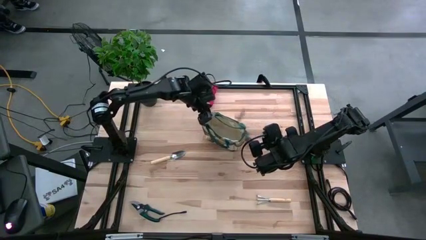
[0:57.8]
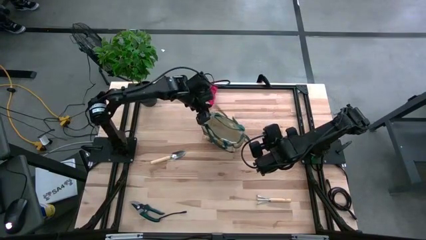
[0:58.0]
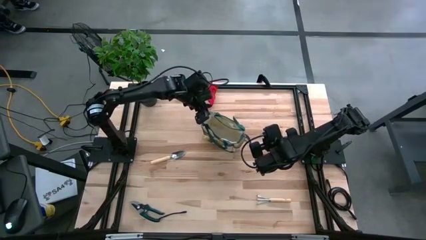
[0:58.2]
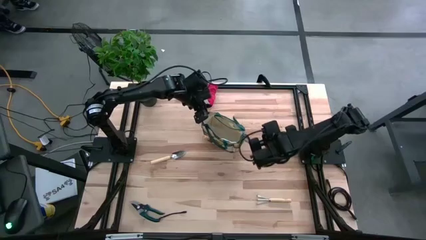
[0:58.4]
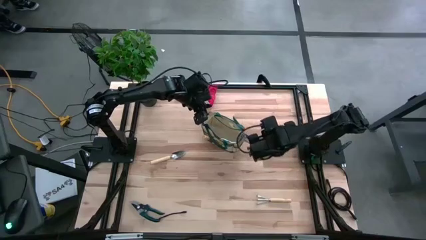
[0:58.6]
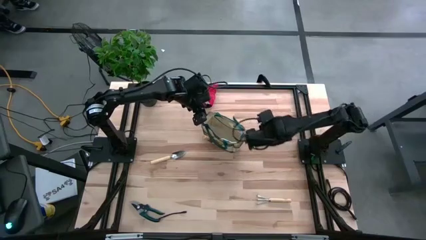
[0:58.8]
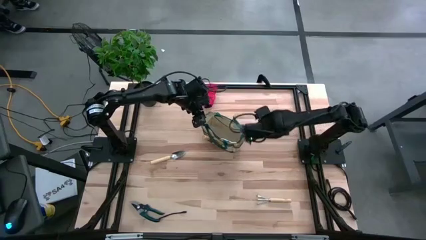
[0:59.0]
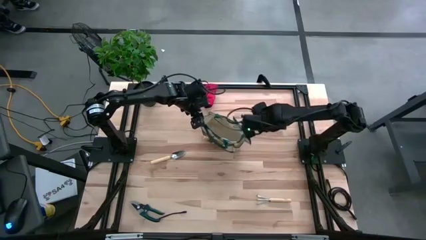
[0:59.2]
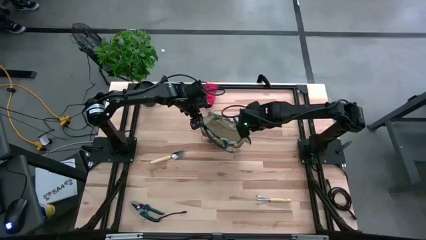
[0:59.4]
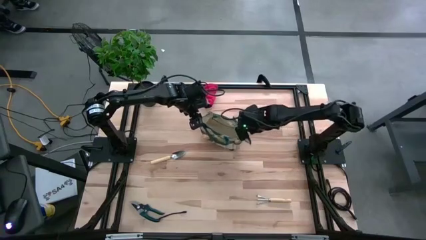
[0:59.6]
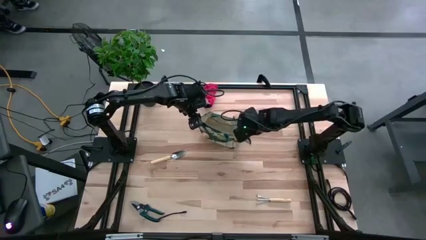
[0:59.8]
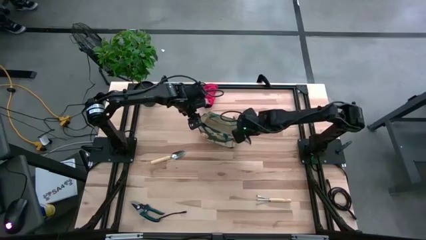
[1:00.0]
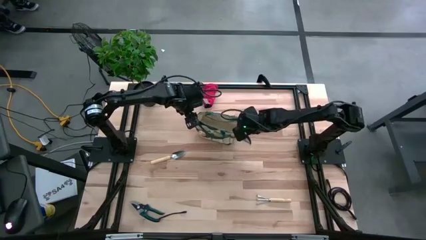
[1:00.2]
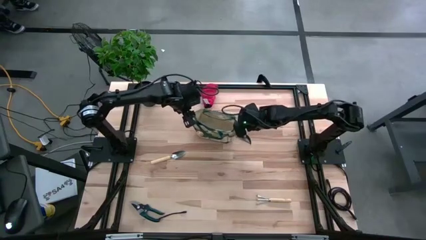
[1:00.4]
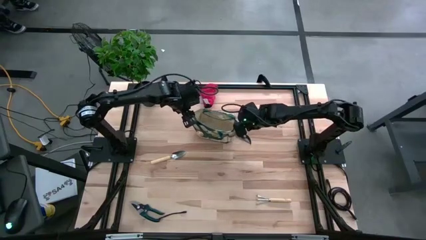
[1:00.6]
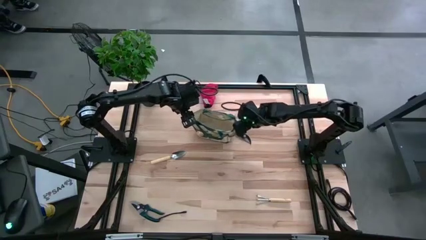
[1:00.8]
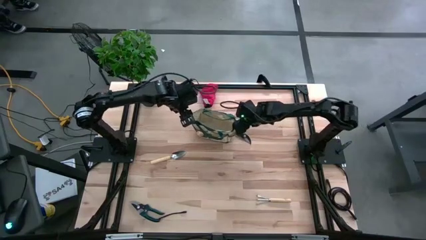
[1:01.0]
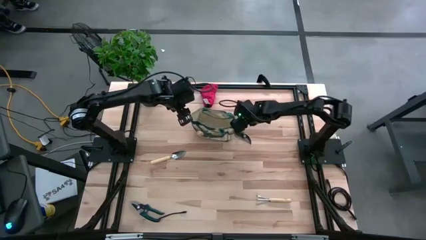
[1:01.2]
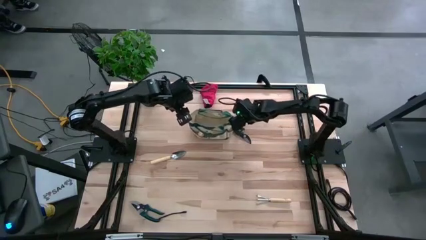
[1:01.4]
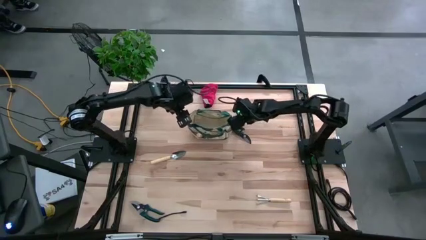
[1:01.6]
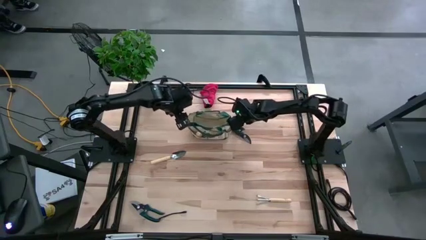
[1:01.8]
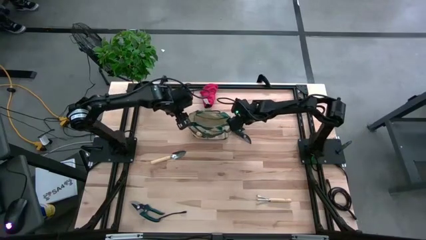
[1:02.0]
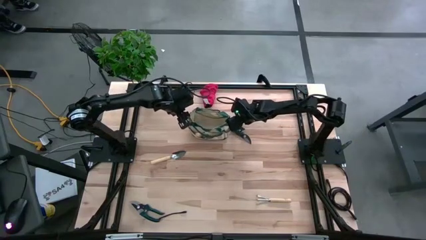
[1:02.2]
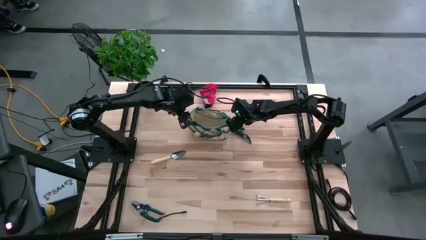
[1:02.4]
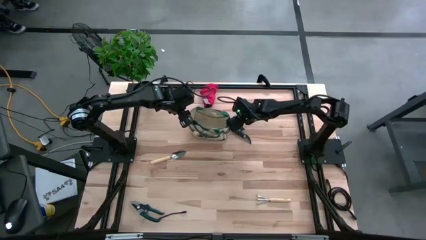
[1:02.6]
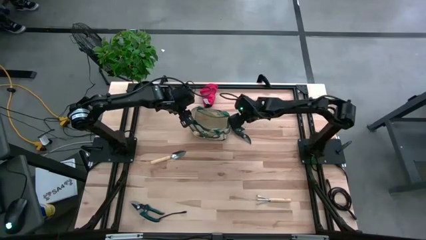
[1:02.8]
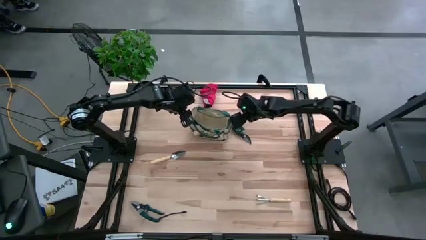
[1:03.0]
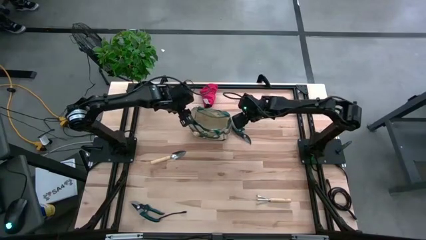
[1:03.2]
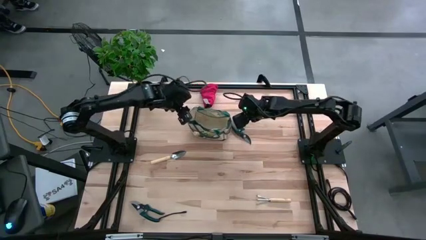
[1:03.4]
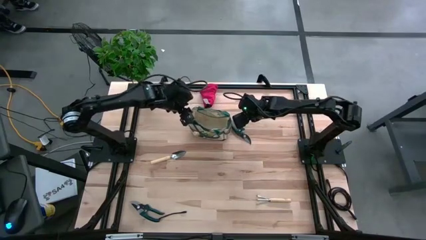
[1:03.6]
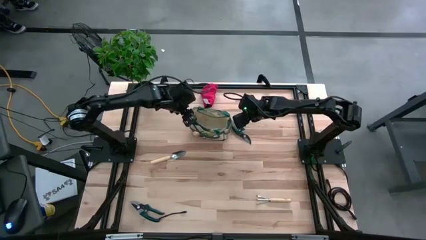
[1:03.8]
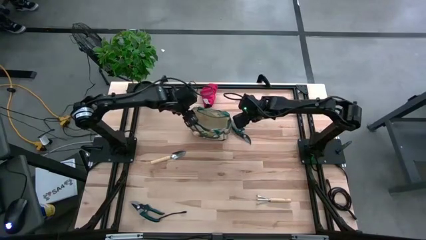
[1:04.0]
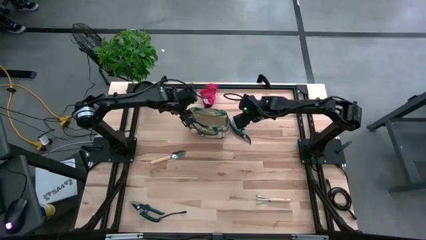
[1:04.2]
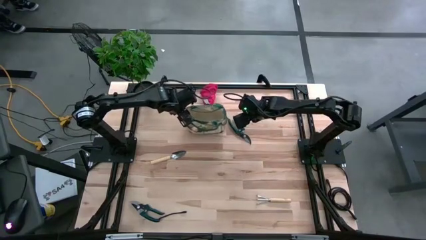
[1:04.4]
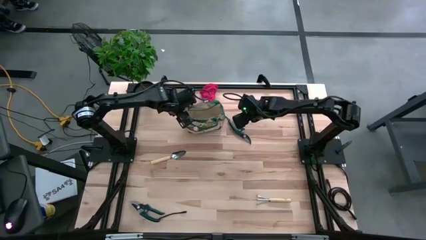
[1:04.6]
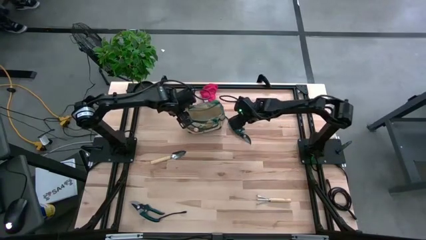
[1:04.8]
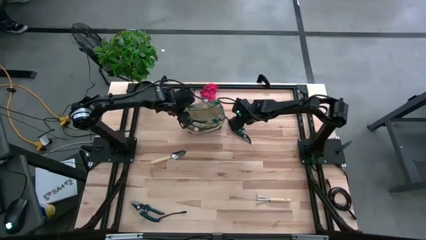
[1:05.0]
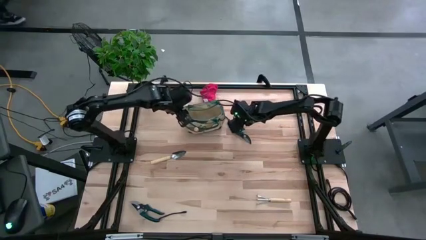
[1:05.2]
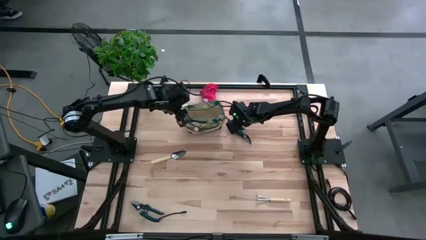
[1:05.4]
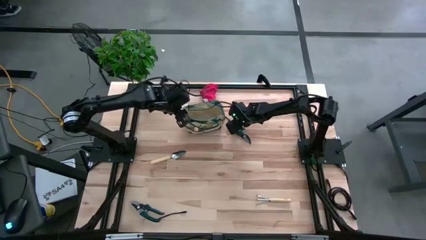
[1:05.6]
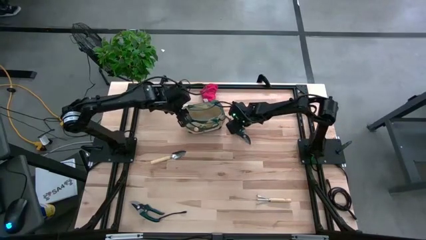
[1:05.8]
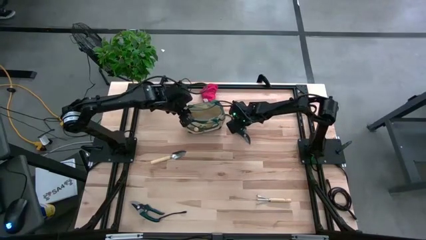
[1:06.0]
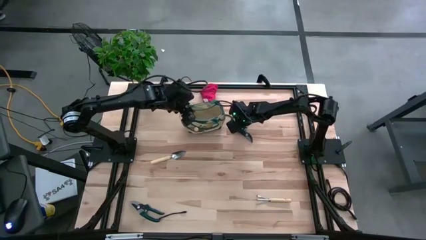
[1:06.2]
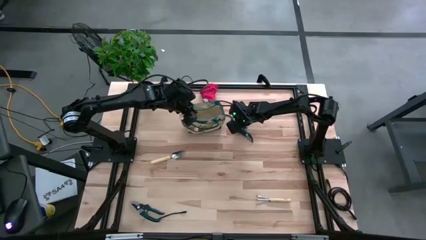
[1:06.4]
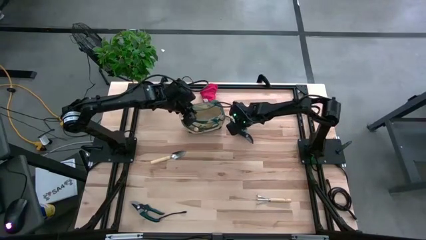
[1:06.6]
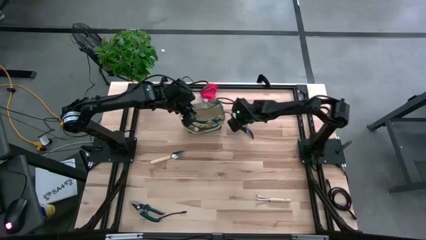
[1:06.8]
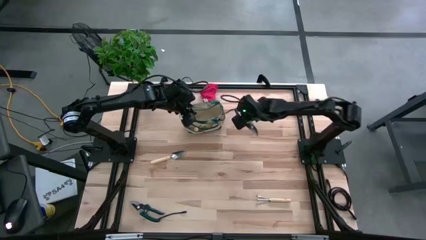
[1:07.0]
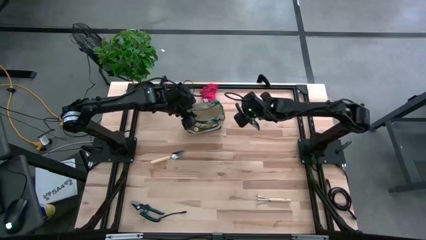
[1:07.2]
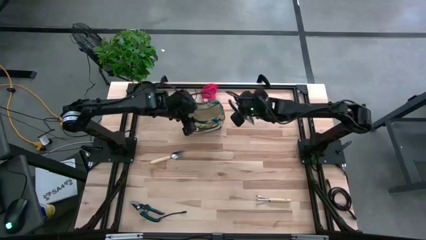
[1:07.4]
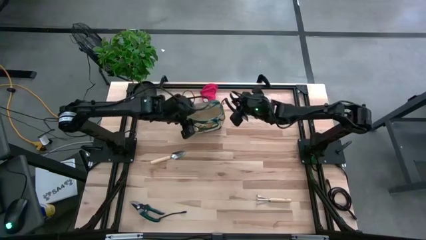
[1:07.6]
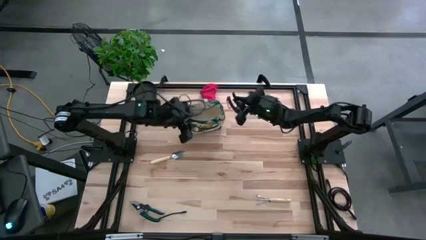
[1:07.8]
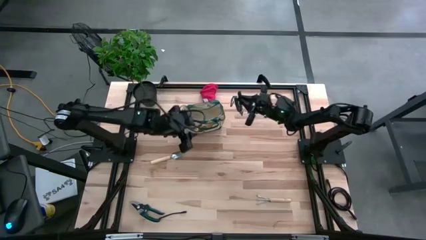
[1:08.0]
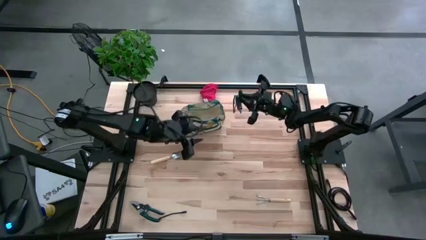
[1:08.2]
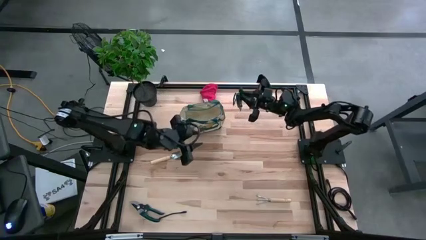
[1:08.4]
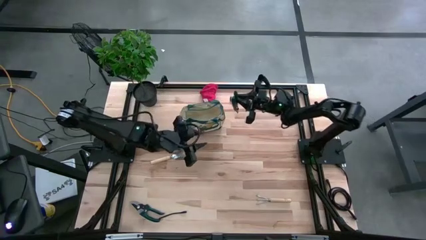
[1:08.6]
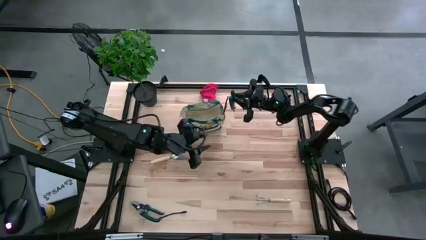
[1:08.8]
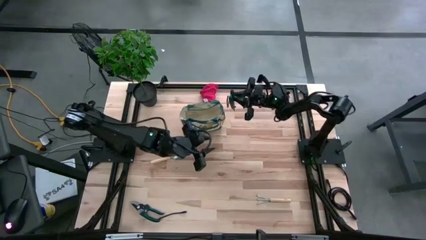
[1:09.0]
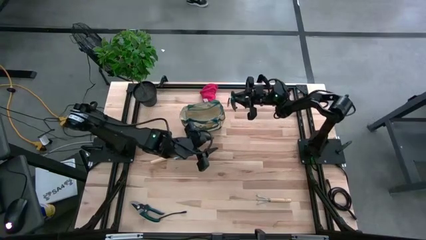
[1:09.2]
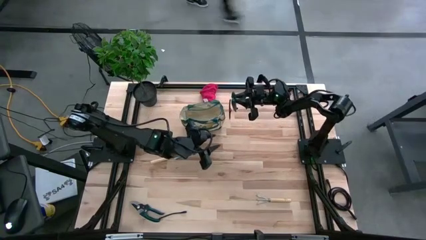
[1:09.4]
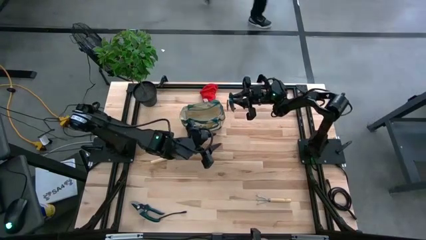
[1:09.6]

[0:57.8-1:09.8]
Task: Pick & Place Garden tools in Gardening bag
Put the top black shear scissor into the gardening bag

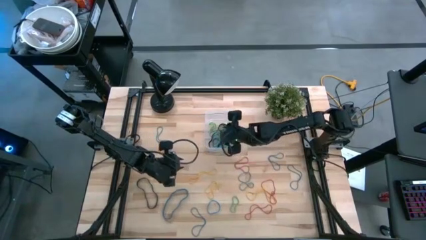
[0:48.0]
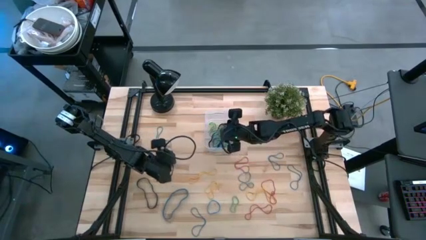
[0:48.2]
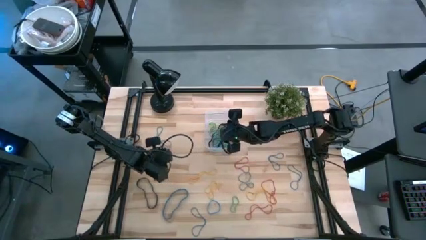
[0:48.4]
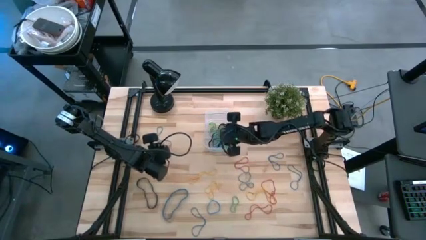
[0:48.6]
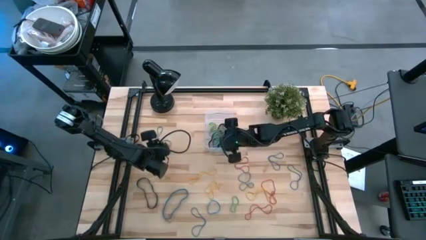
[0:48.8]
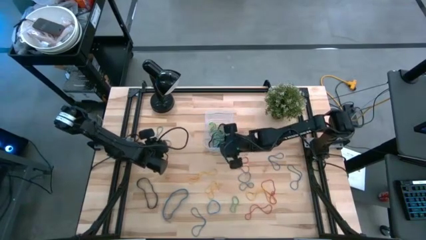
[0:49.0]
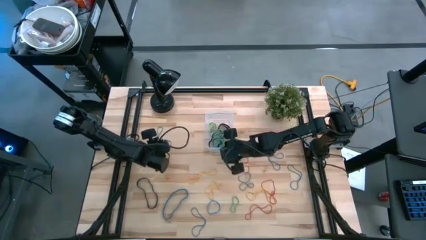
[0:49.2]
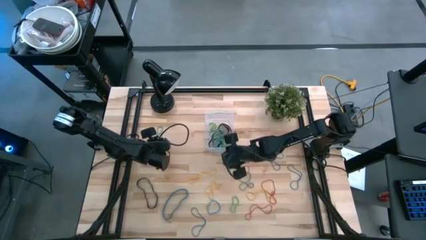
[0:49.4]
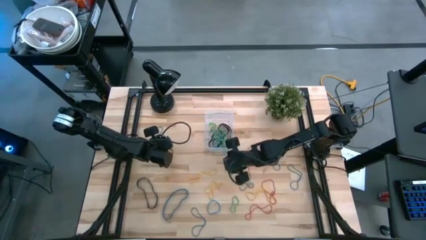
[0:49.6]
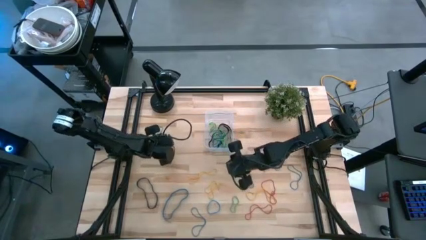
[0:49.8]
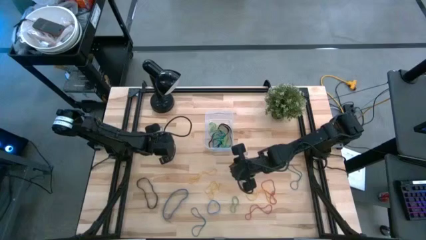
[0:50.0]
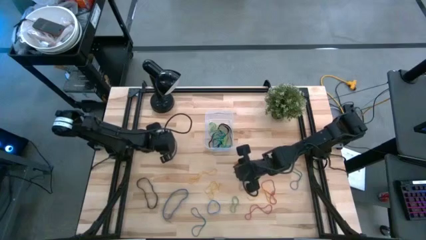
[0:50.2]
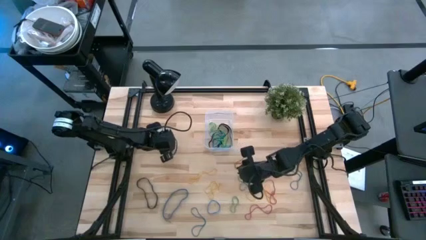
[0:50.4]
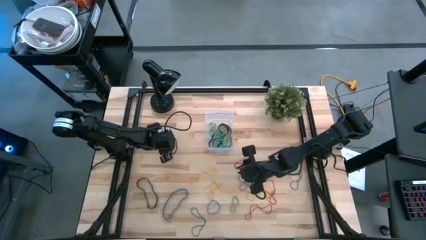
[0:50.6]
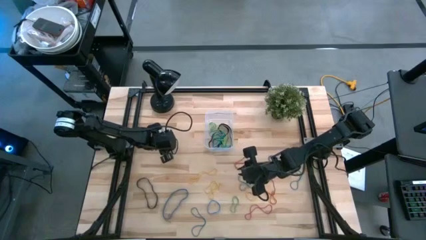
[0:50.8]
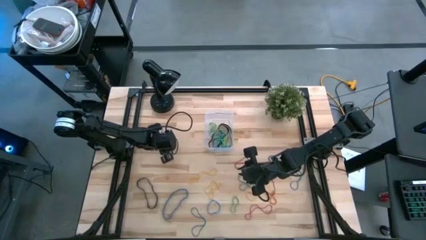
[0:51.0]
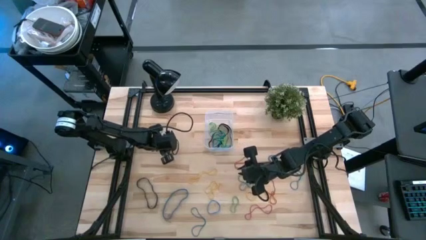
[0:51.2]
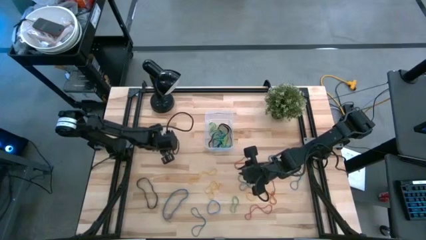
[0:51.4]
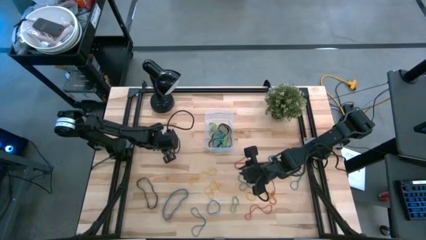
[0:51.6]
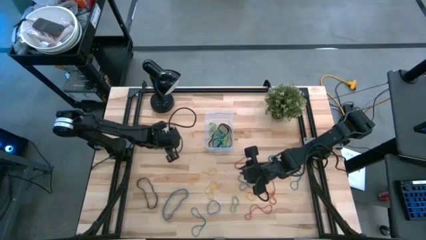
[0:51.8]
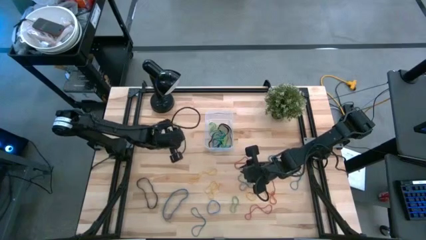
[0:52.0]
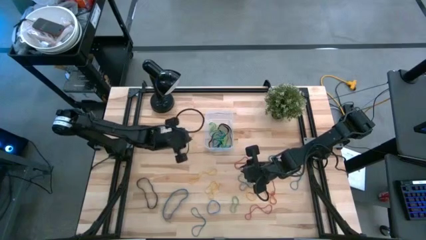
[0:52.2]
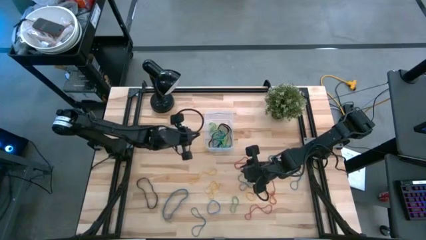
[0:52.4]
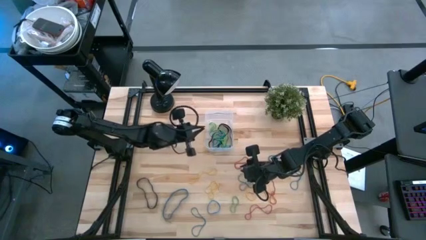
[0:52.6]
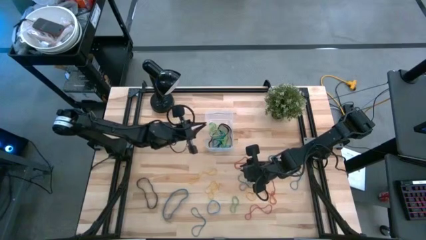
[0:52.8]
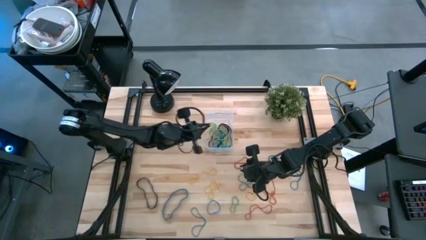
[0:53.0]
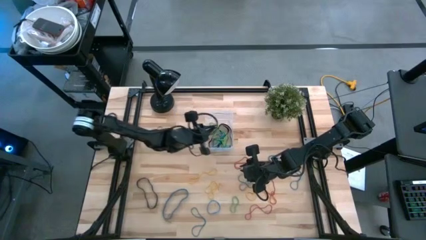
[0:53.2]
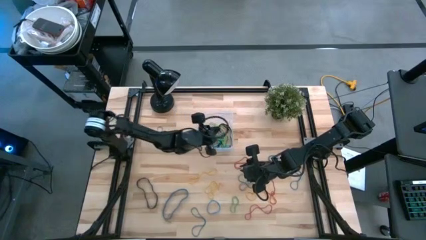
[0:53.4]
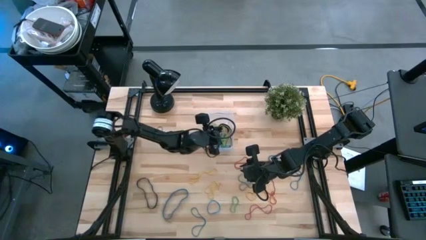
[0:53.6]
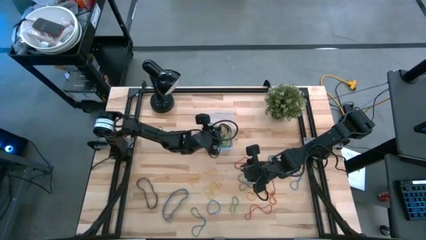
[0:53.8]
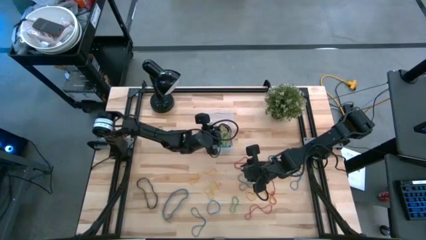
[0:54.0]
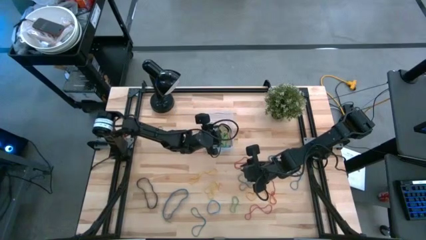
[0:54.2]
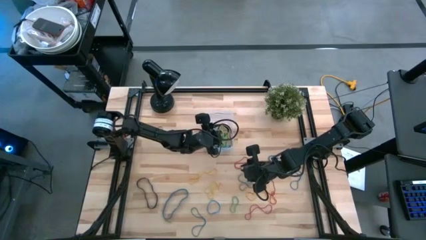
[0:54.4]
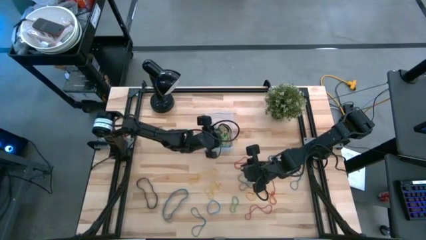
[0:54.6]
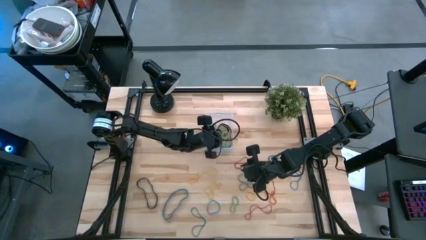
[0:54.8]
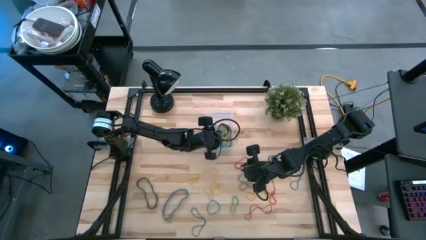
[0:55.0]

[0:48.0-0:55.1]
Task: Pick and place rubber bands into bin
Put yellow rubberband into the transparent bin
